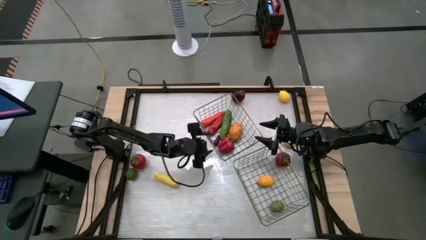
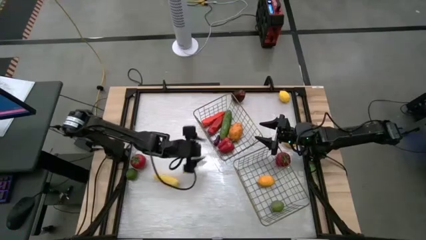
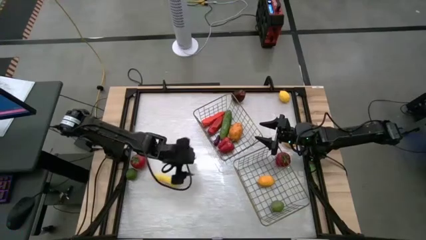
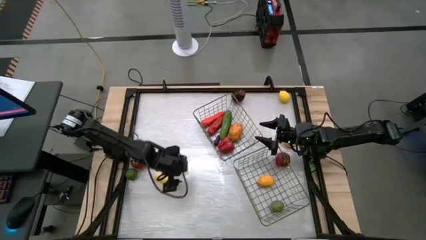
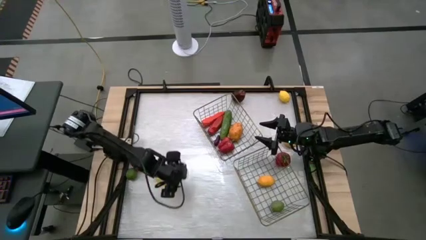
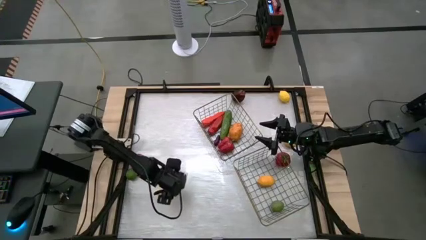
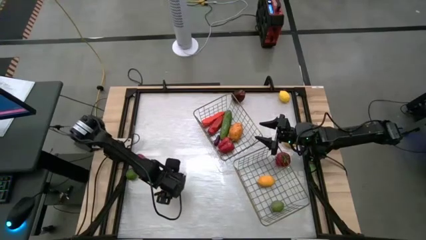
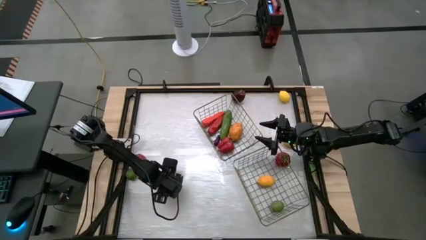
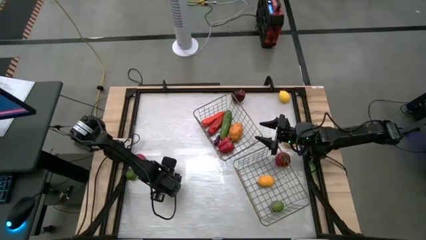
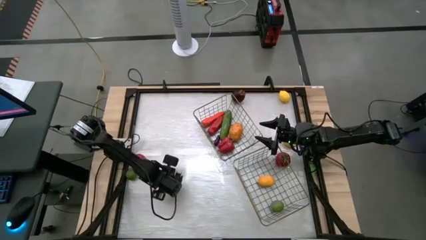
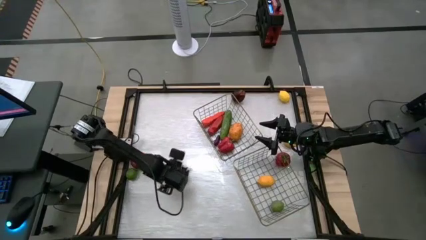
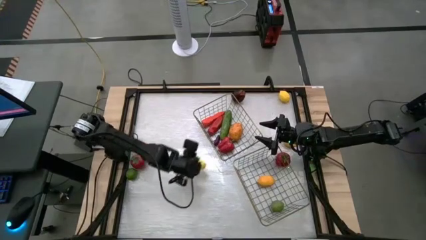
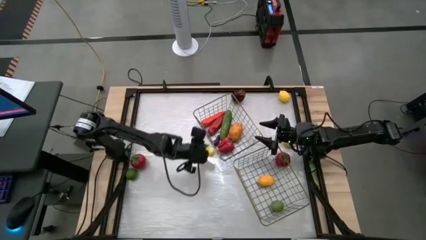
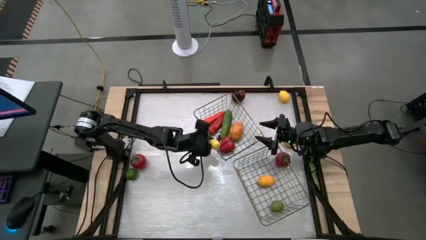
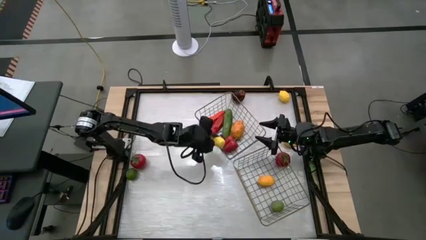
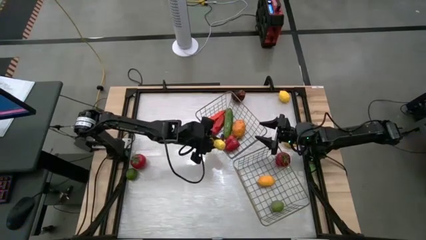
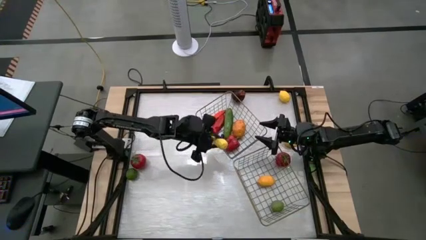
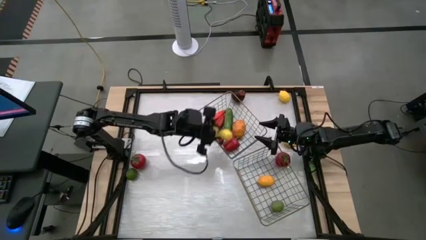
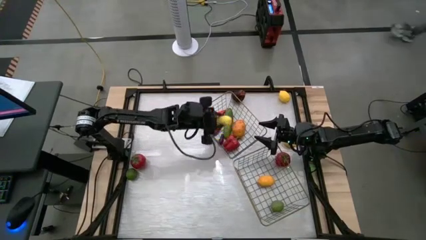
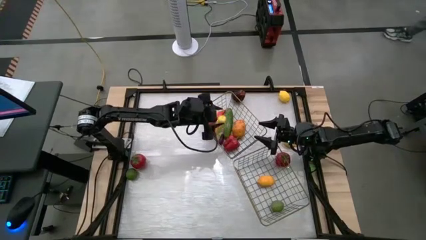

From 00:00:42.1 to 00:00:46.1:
Task: Sort produce into baskets
Put the corn into the left wire basket

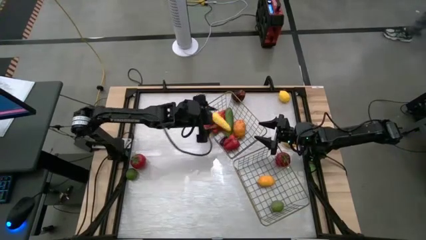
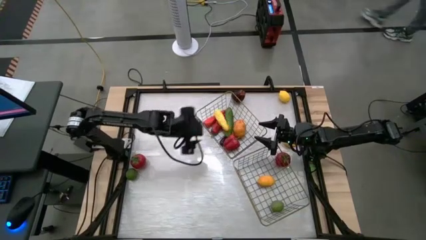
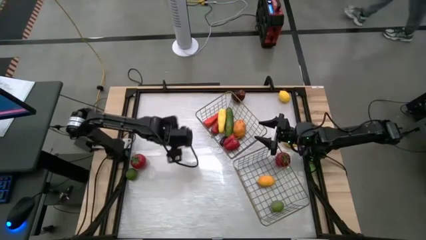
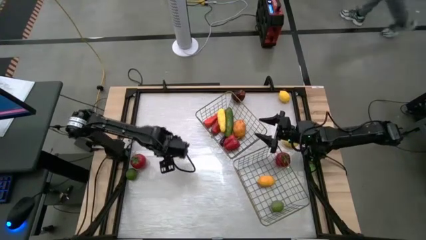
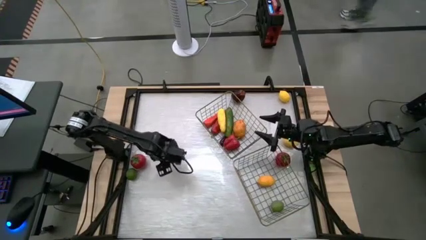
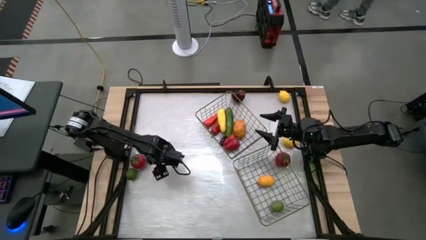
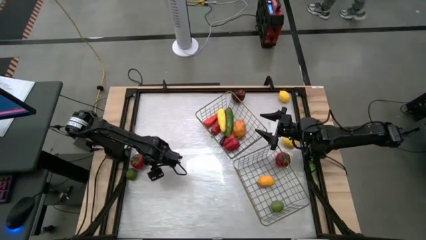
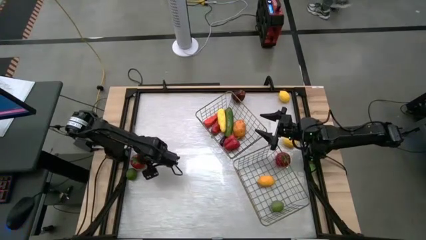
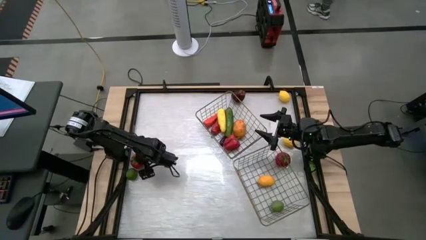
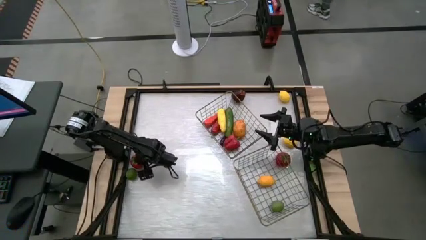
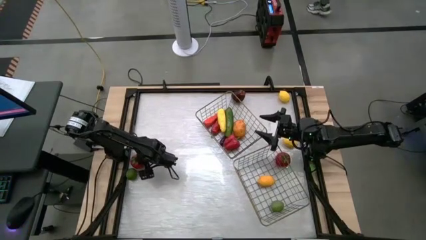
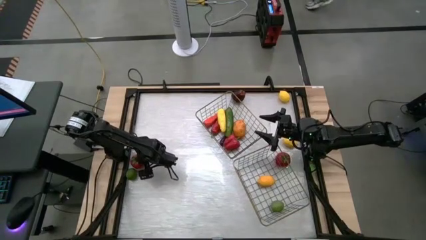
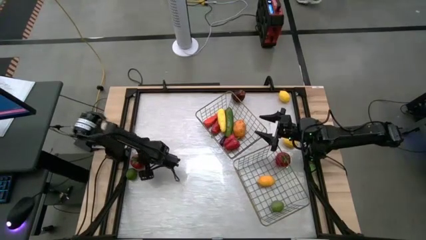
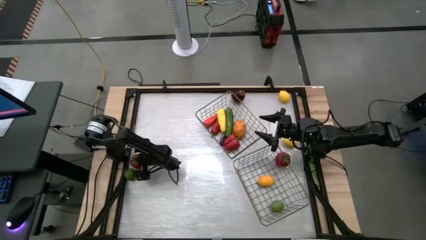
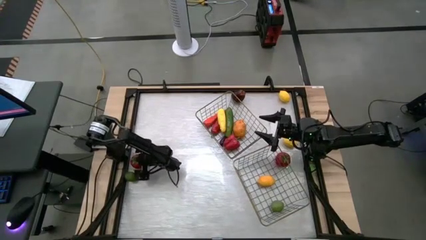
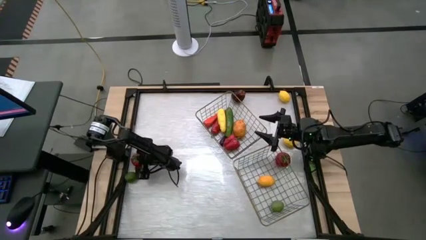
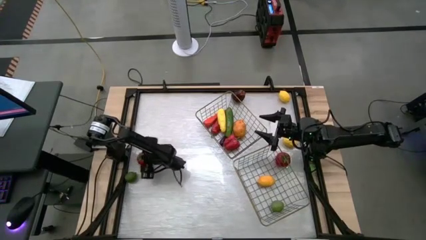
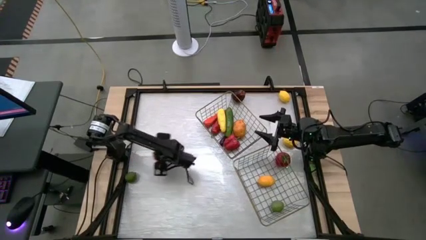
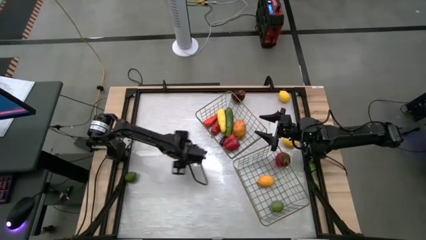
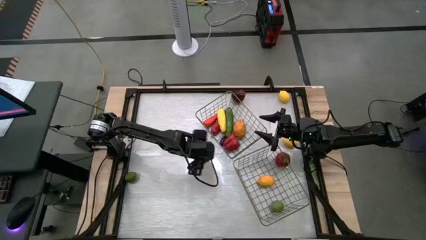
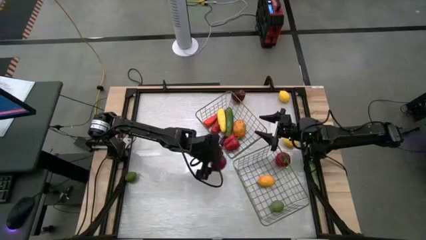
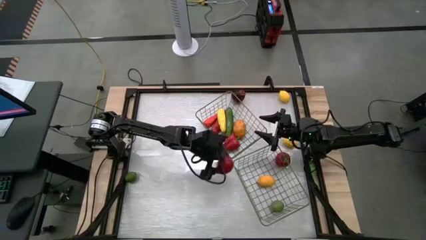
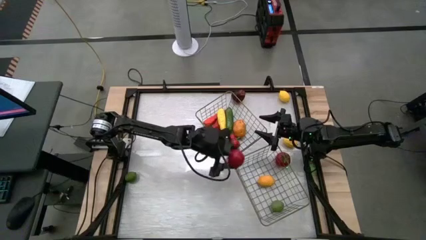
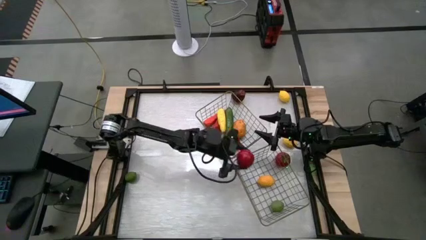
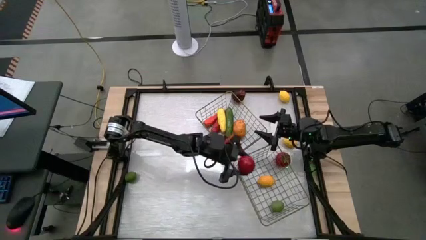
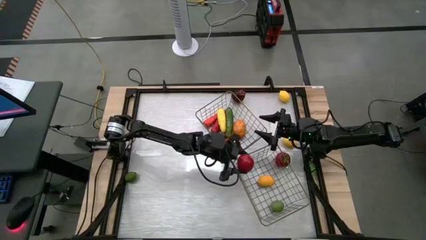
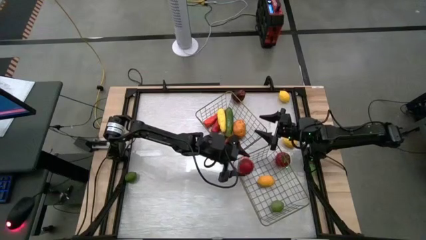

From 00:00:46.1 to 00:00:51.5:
Put the left tomato into the right wire basket

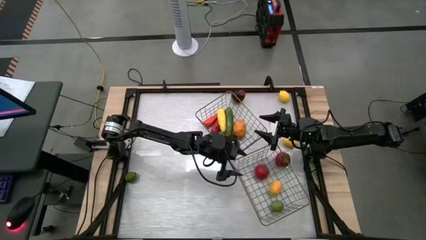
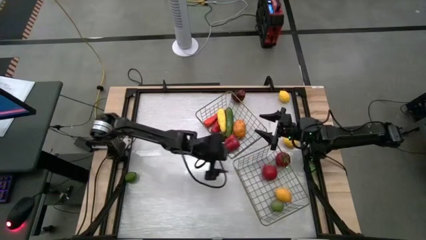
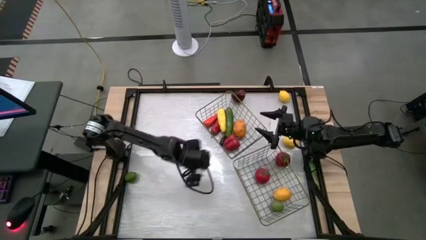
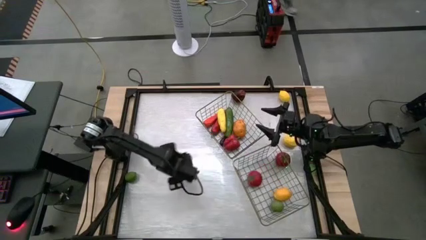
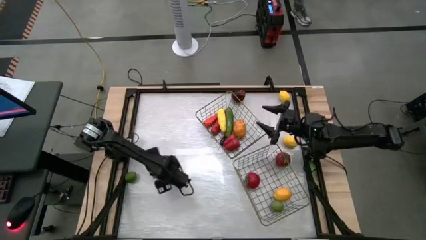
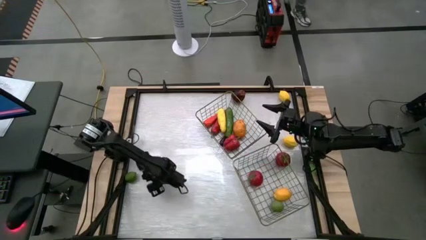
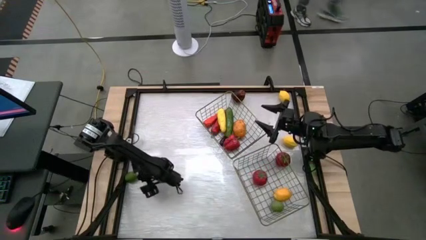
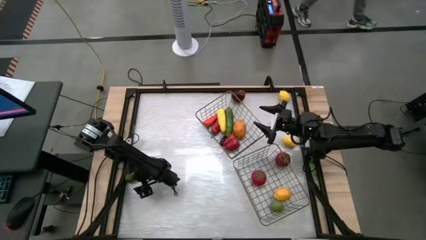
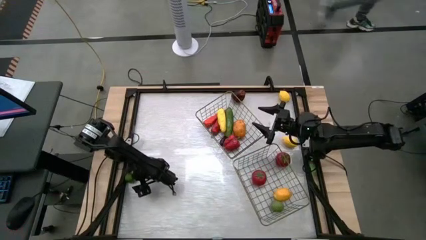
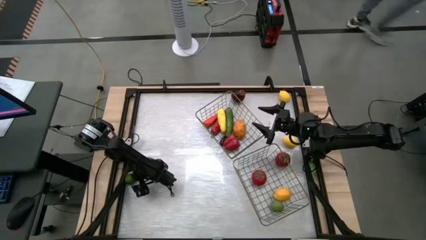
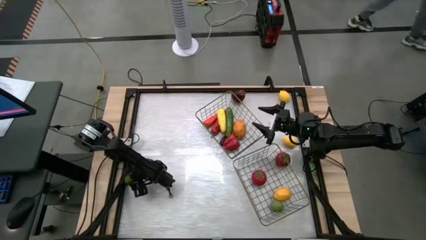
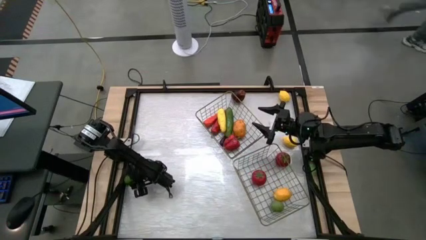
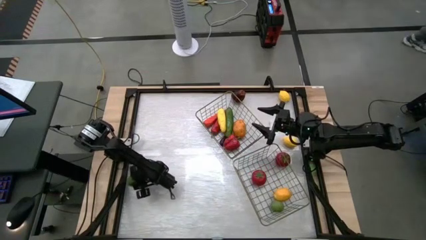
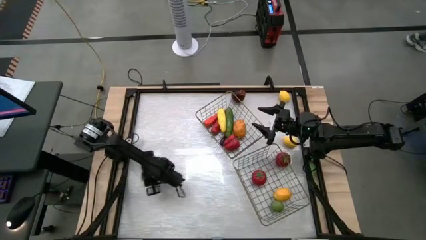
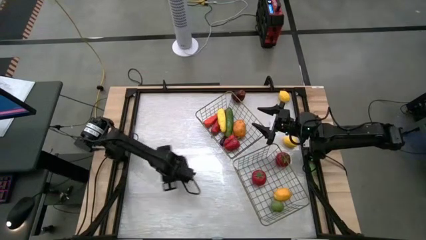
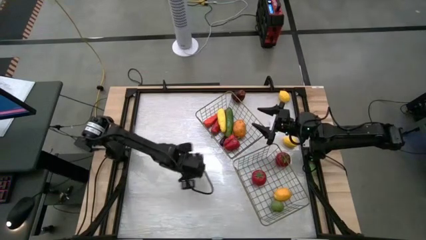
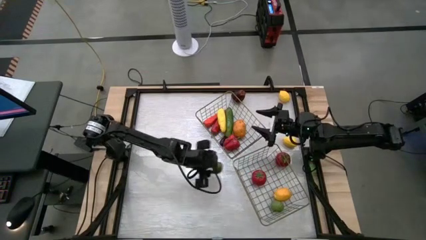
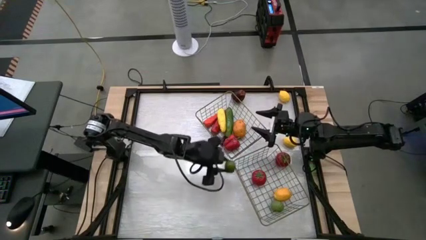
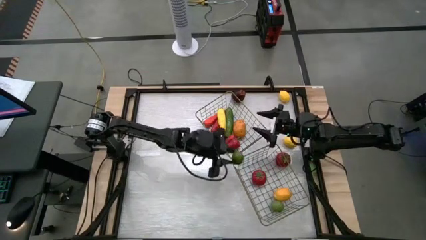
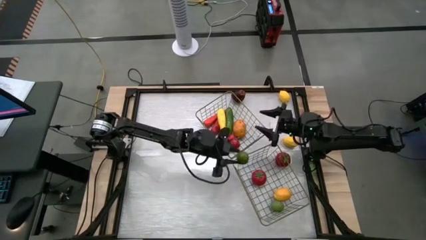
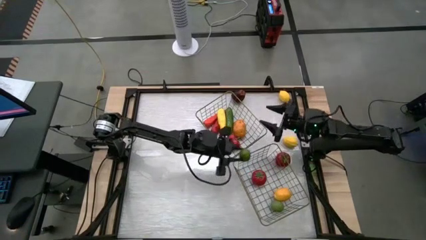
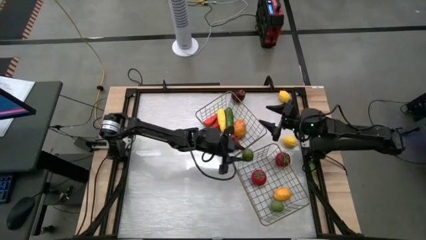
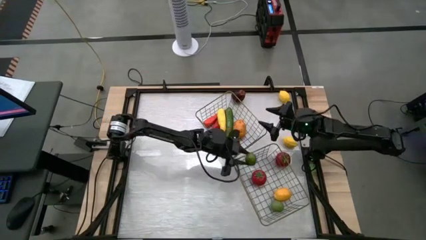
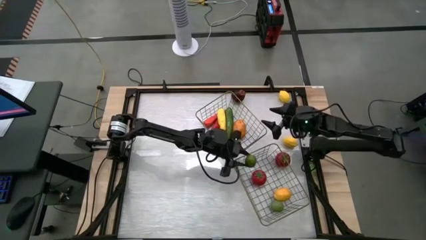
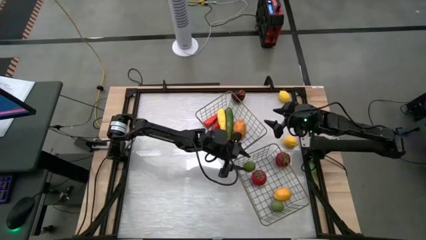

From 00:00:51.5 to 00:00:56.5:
Put the lime into the right wire basket

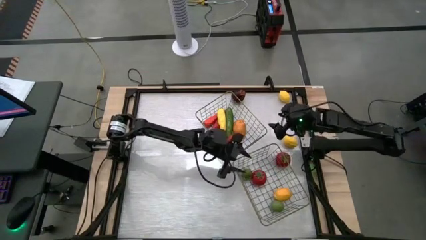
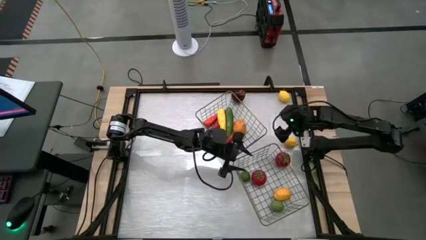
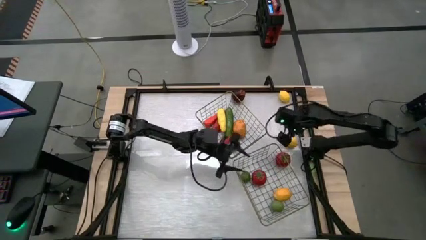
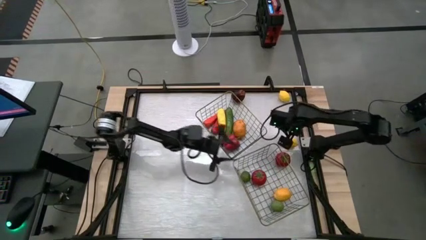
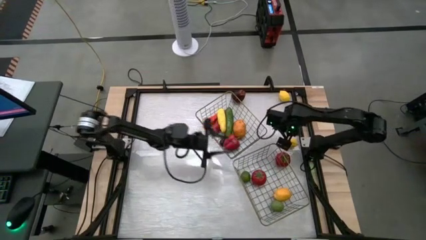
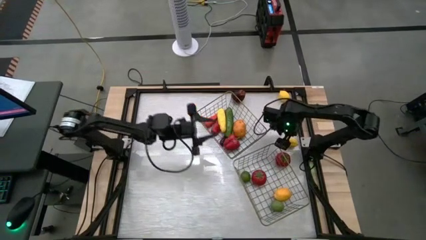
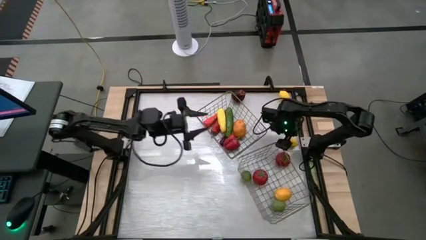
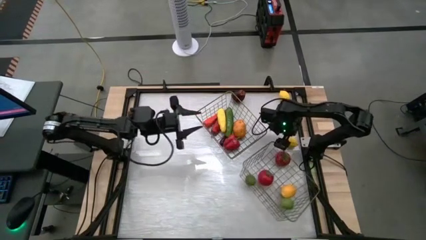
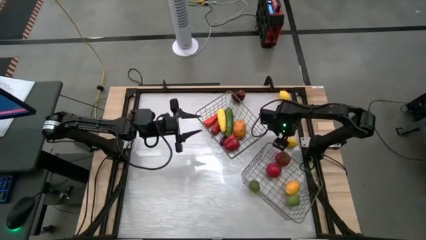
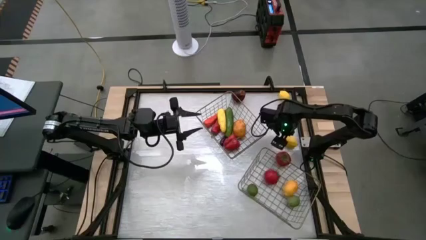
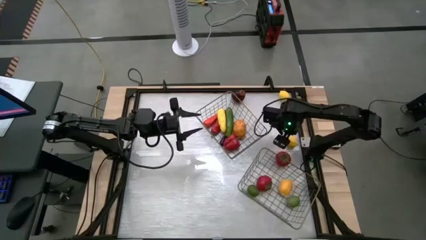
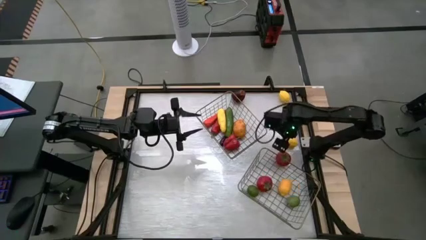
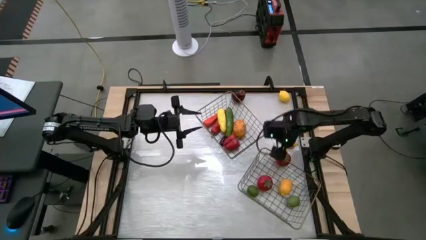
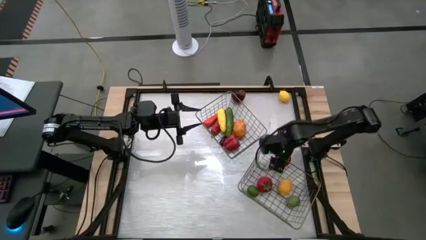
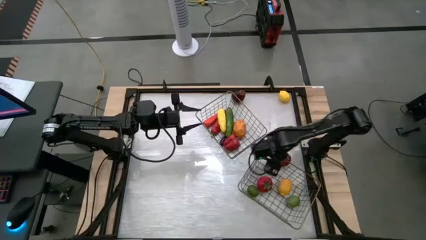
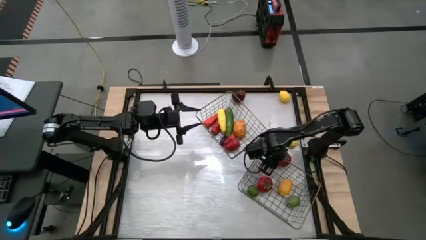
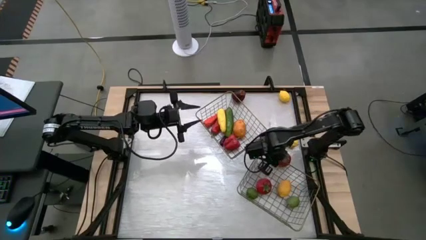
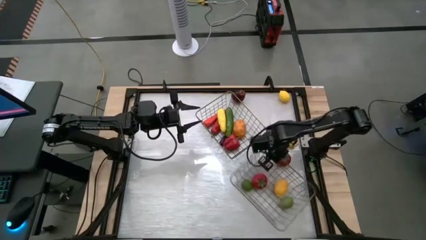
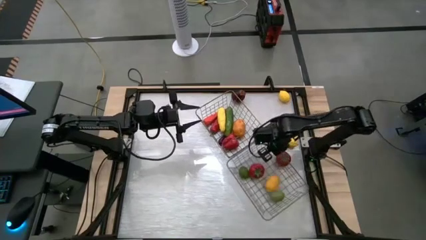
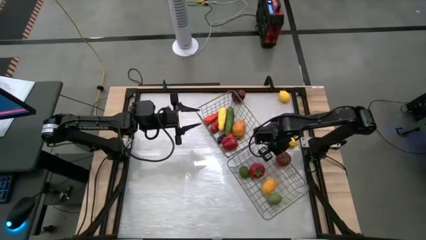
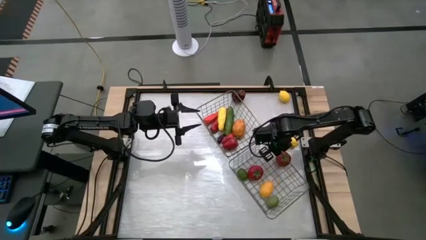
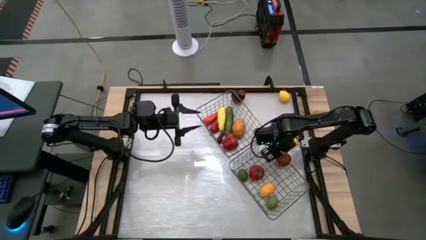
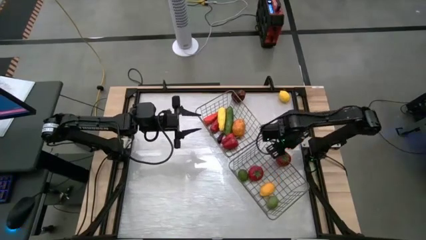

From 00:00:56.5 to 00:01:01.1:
Adjust the wire basket
